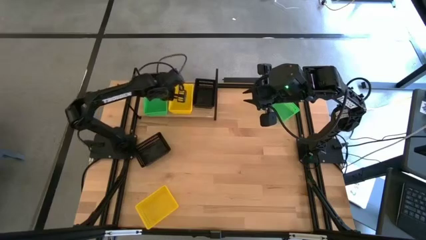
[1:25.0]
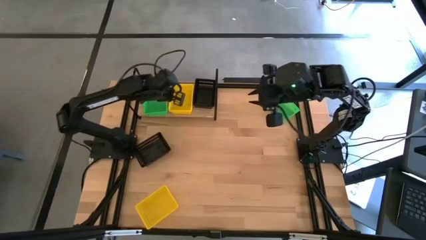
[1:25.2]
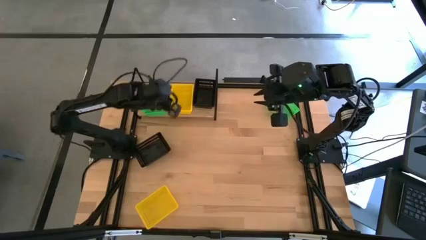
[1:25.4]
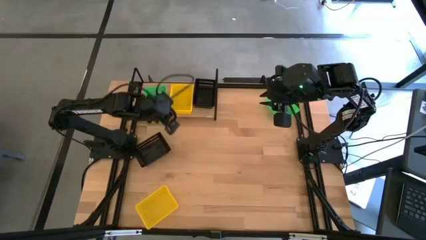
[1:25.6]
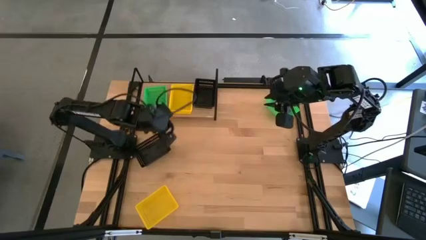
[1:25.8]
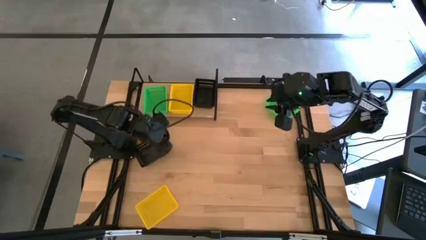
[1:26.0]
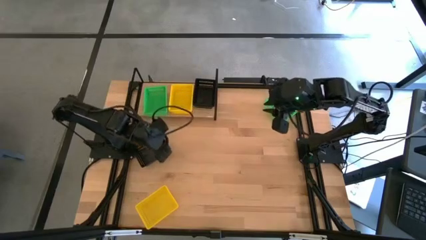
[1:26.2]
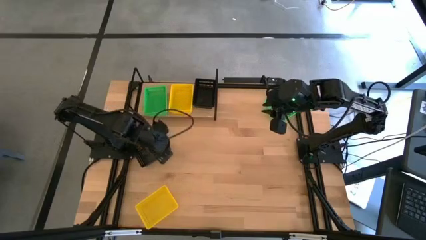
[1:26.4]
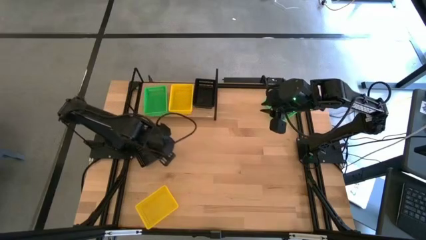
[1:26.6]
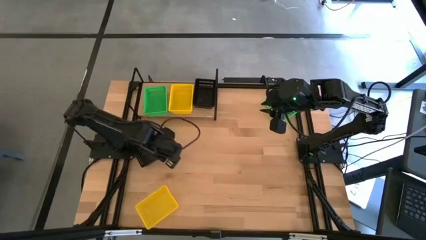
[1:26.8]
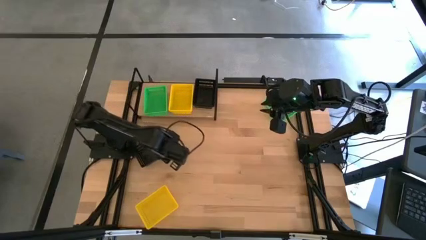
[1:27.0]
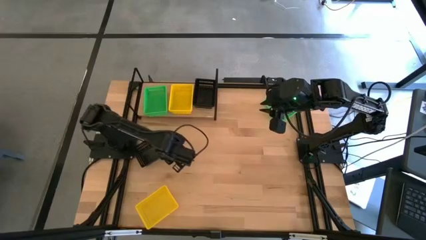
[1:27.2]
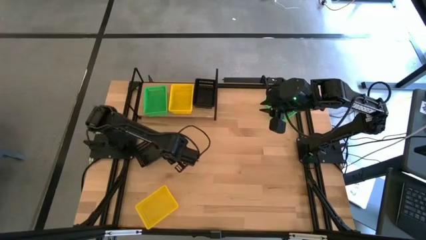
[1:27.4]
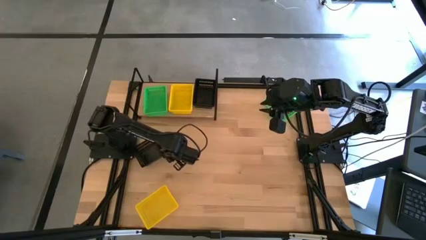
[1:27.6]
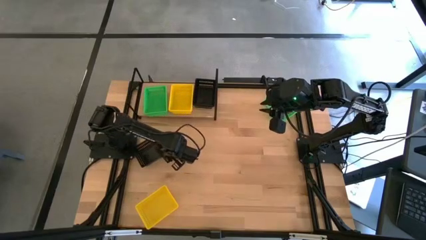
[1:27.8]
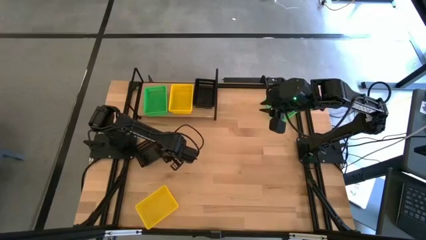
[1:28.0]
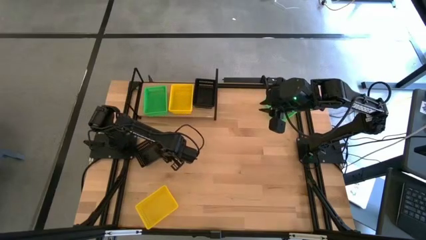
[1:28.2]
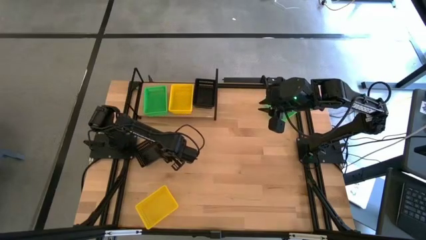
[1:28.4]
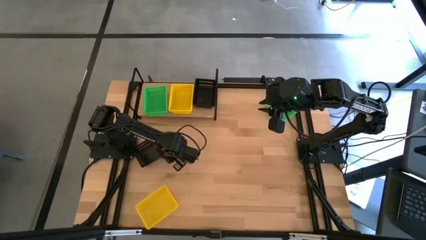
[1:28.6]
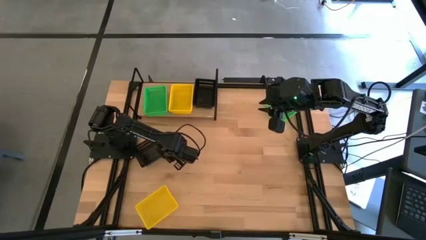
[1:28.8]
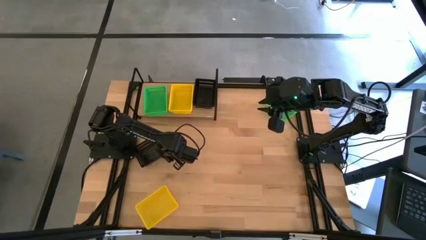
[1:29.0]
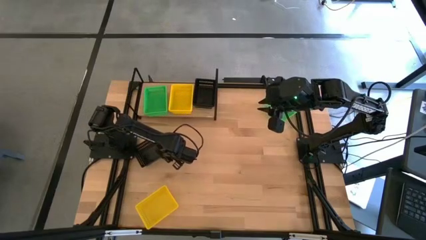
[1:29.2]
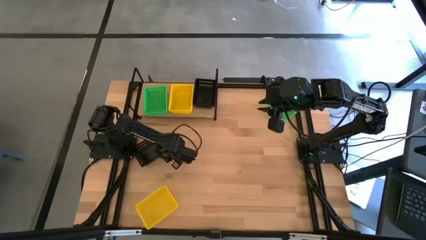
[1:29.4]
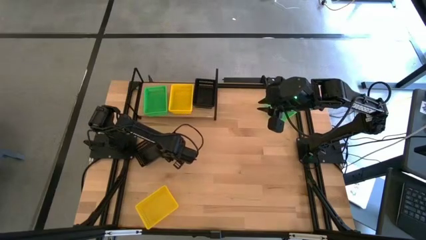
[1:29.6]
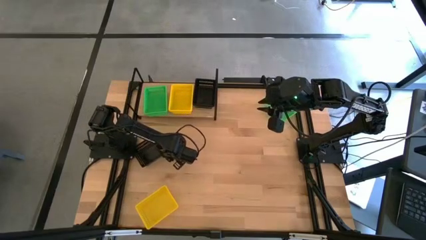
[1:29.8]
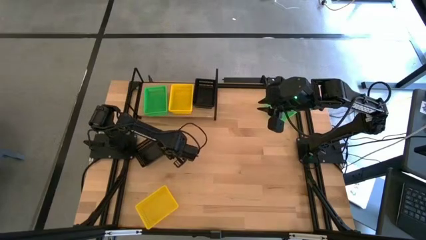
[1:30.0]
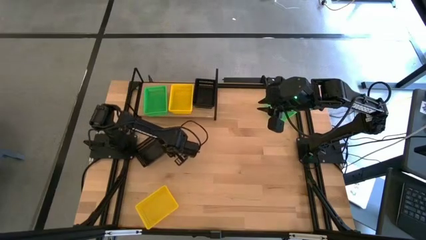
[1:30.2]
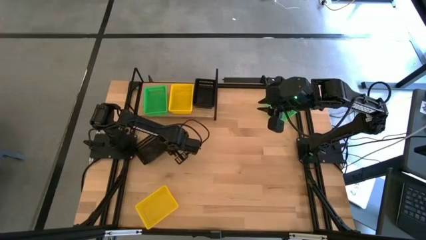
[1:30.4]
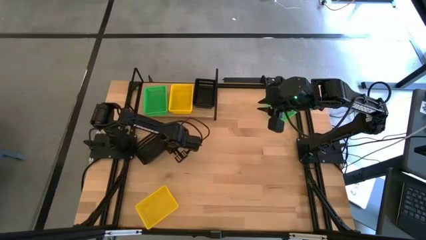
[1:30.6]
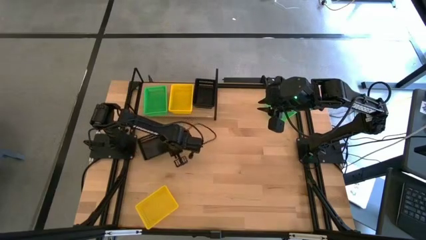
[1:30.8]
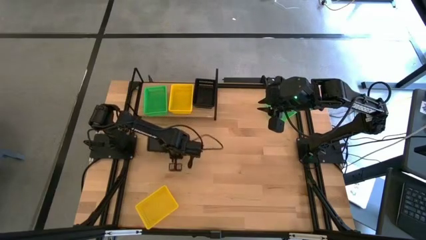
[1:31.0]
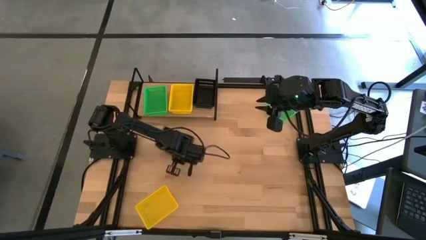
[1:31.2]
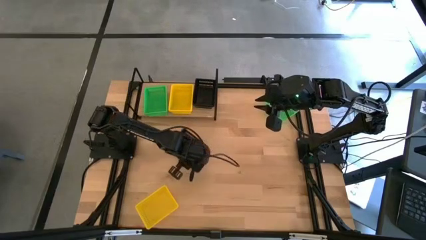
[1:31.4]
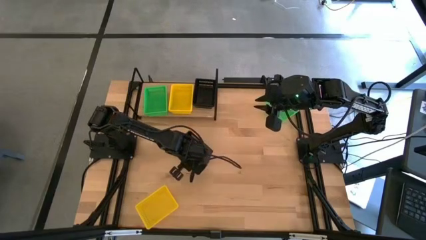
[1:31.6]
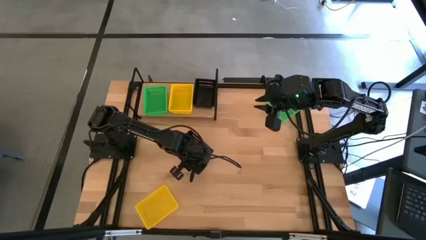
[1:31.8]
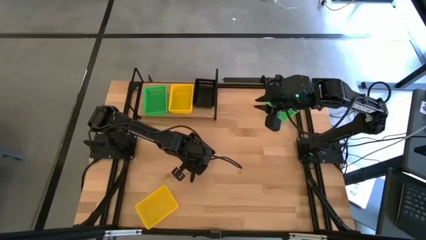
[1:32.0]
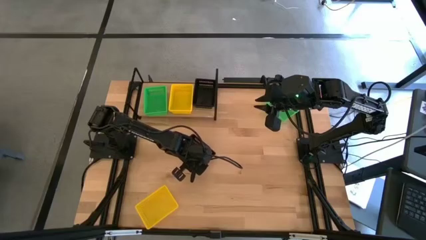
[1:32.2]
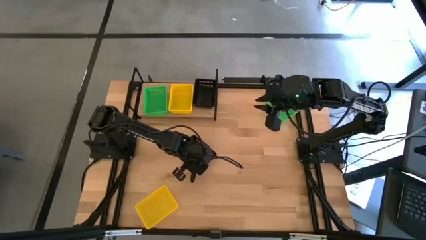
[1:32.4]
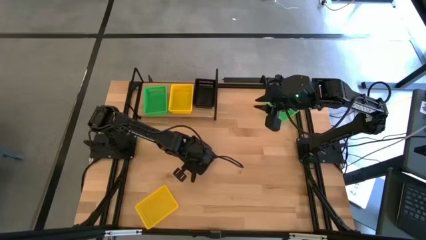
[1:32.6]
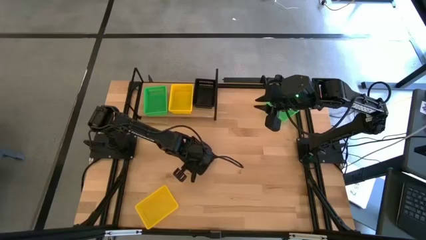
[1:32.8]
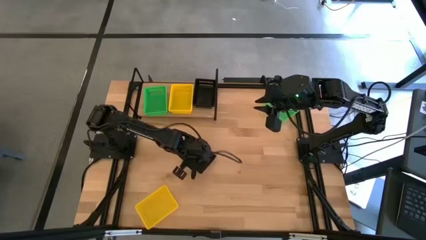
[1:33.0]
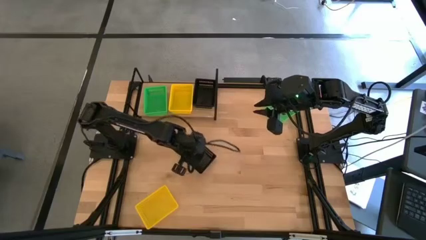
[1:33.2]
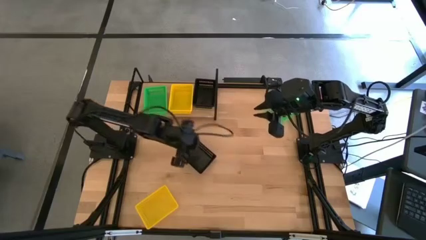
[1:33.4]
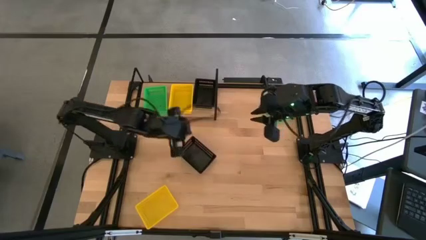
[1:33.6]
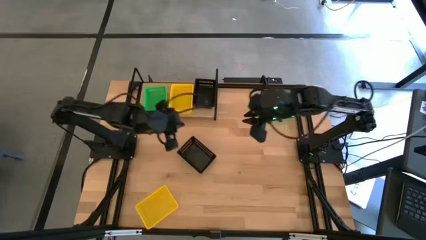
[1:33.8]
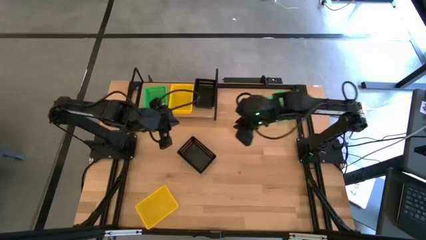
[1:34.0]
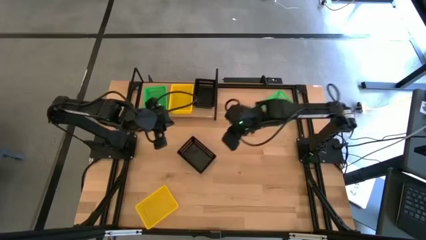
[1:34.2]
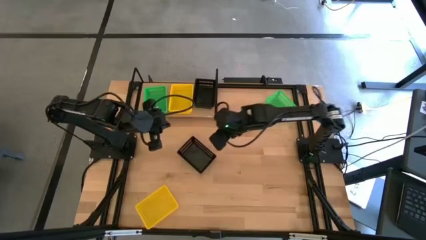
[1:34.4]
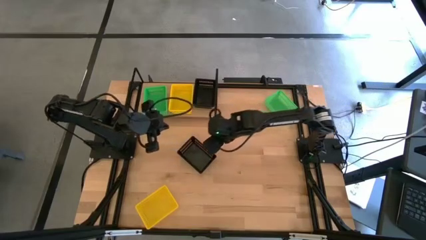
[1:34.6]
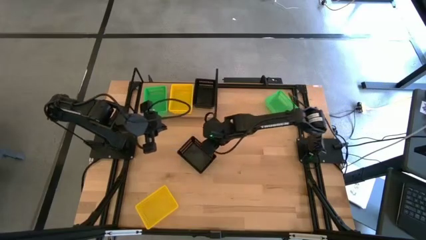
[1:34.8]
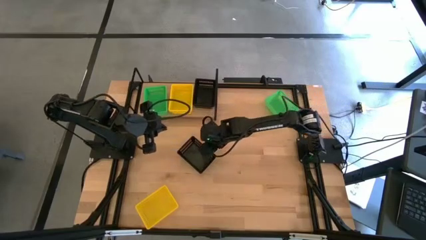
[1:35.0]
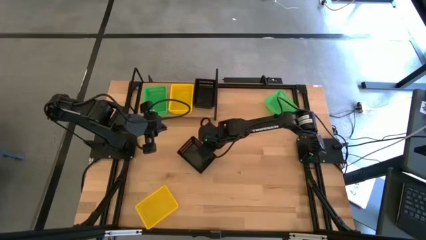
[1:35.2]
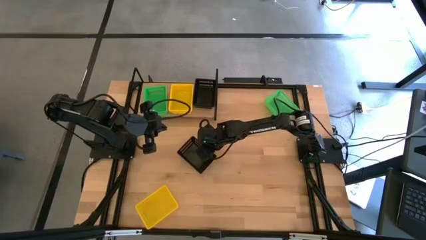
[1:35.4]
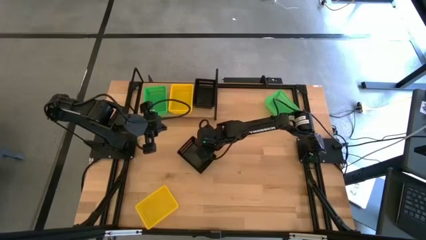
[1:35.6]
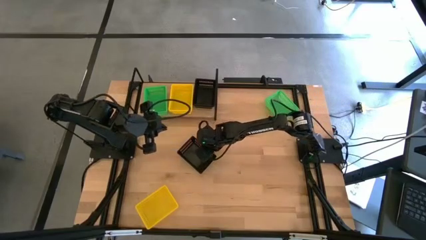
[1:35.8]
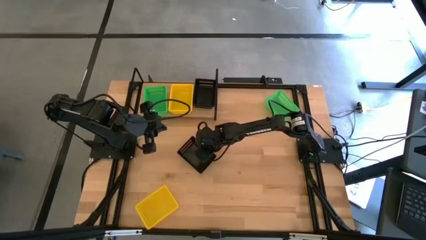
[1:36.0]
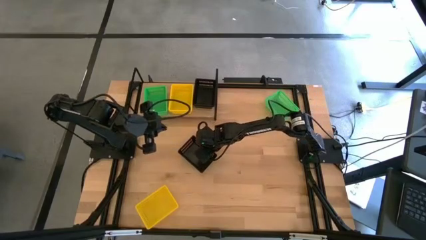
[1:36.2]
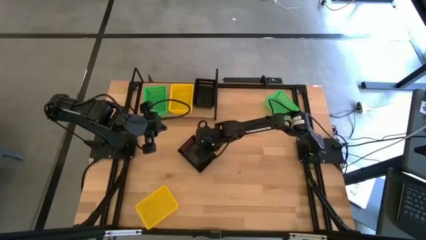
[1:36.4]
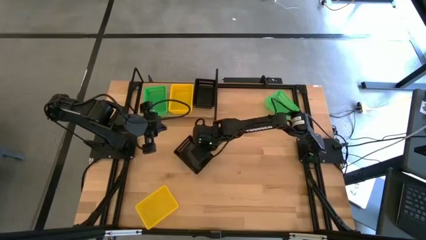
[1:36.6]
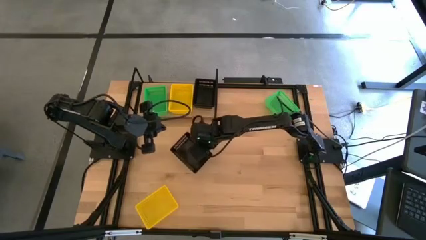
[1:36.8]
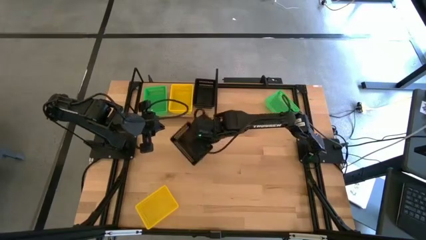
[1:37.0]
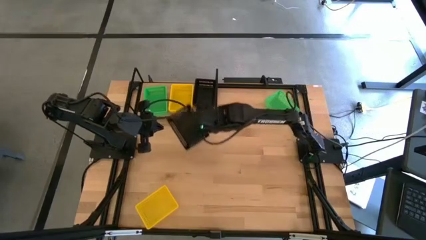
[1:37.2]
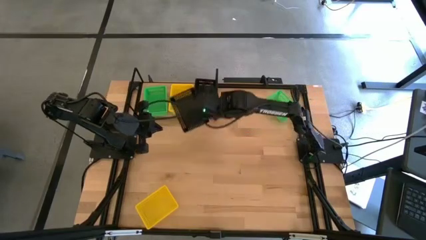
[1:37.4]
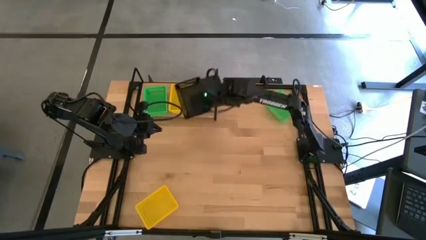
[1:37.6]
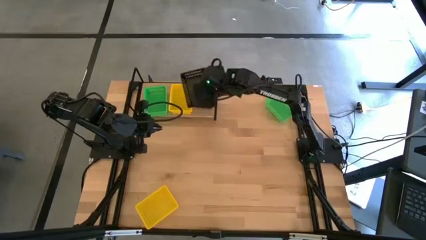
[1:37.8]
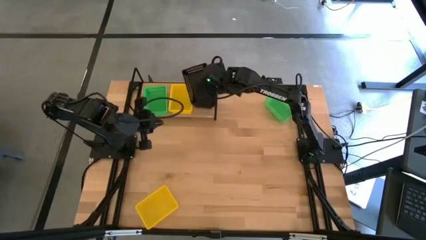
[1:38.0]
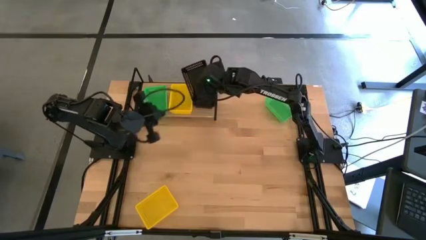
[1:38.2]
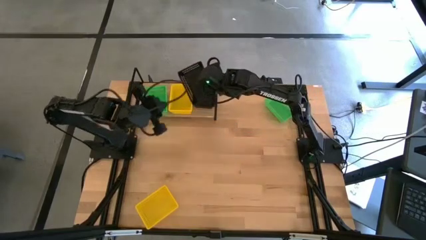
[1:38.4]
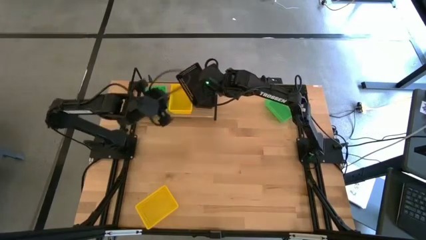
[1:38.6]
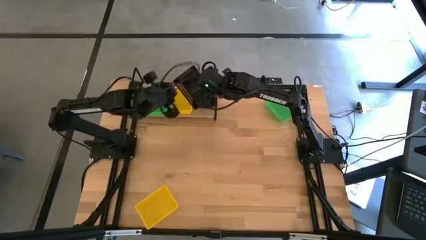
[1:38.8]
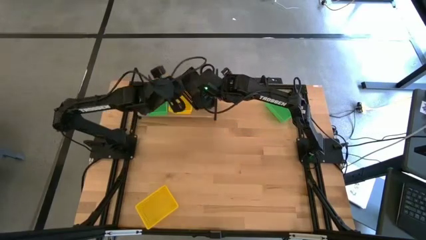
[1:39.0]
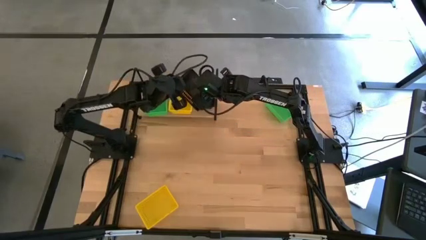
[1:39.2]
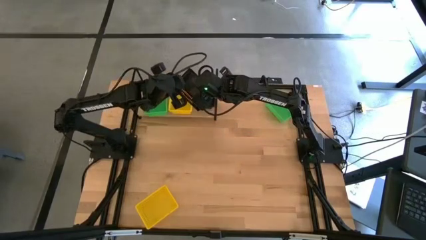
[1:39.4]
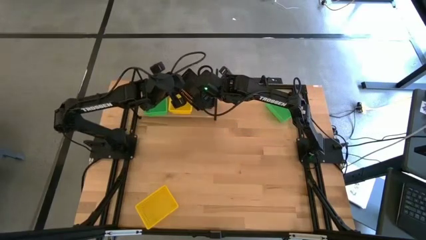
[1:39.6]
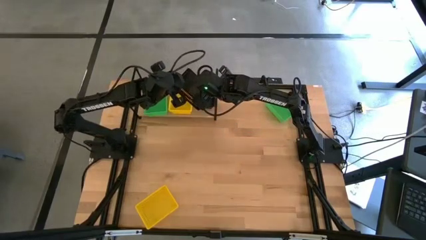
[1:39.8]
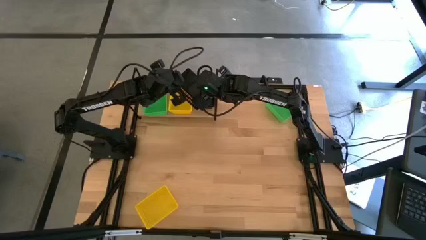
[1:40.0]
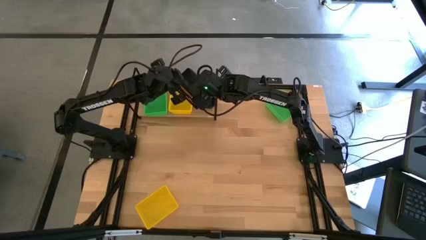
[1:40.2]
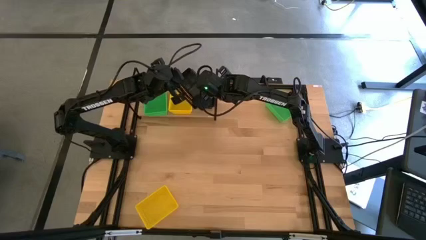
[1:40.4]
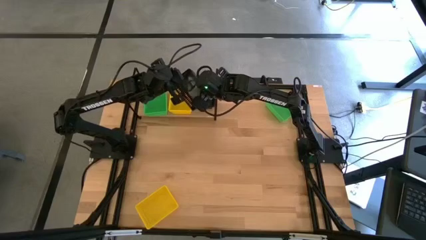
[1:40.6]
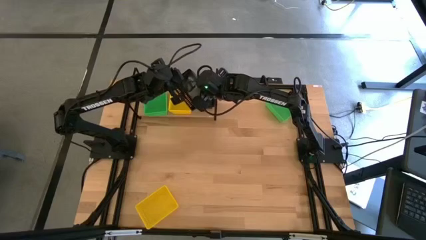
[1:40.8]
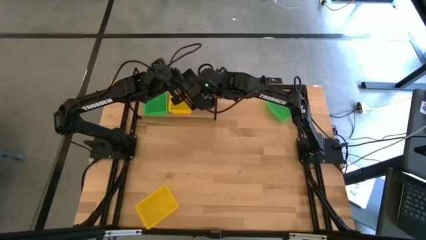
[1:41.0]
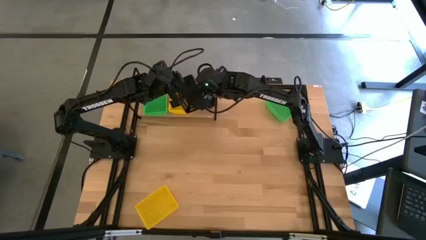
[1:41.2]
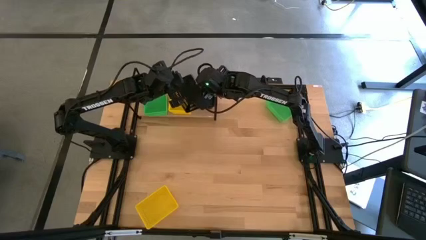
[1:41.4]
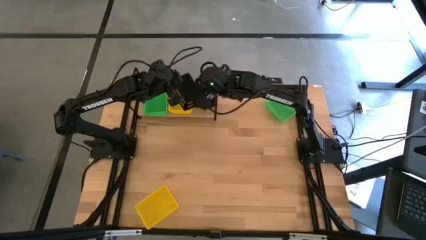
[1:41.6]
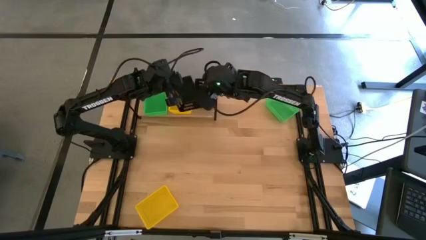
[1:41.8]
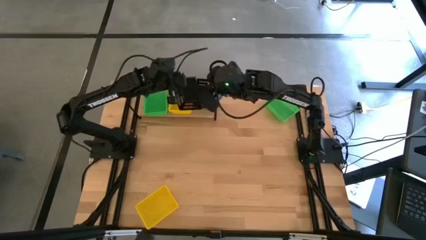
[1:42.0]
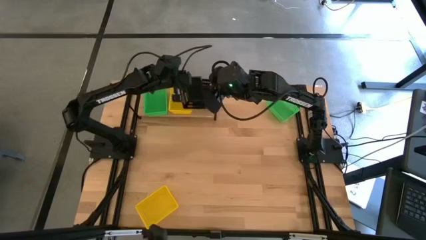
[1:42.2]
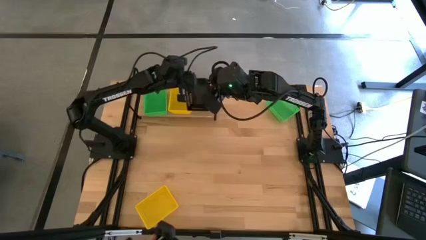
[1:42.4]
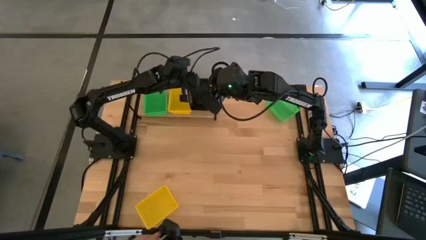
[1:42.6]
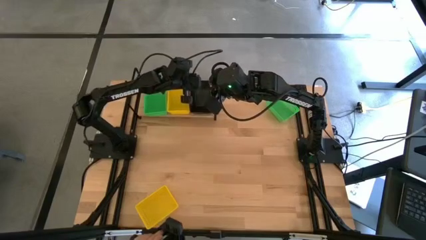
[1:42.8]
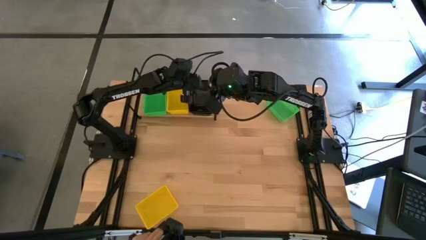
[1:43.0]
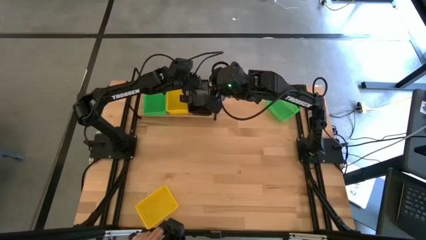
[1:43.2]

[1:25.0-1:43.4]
Task: Stack baskets on shelf by color
Stack the black basket on the black basket on the shelf
